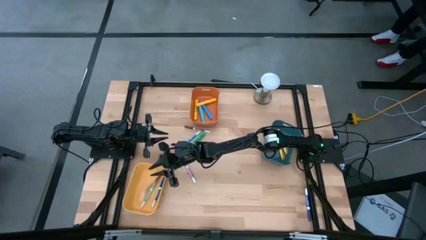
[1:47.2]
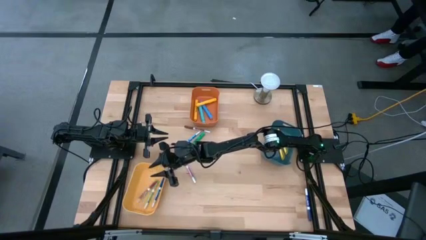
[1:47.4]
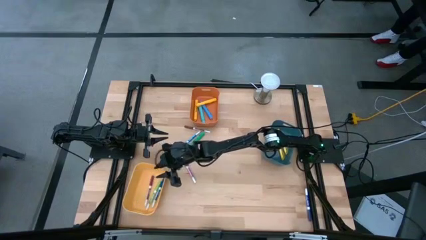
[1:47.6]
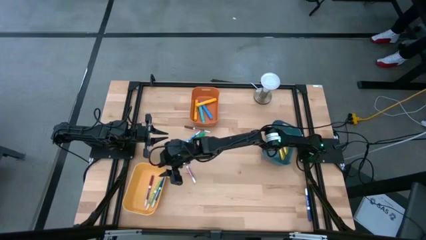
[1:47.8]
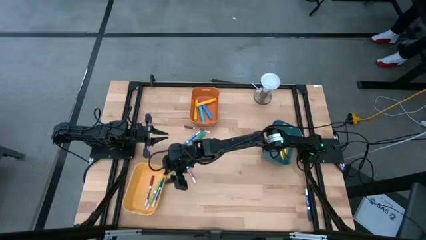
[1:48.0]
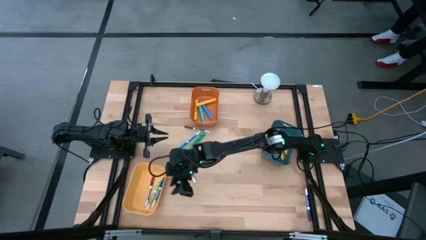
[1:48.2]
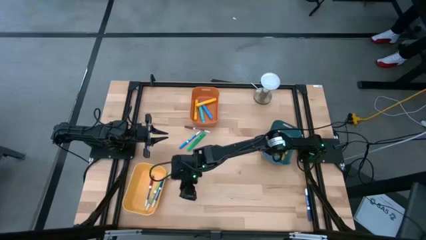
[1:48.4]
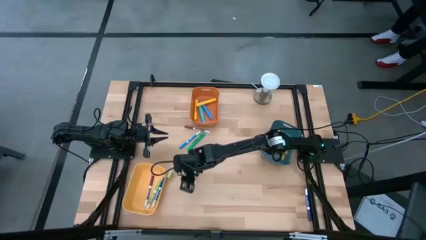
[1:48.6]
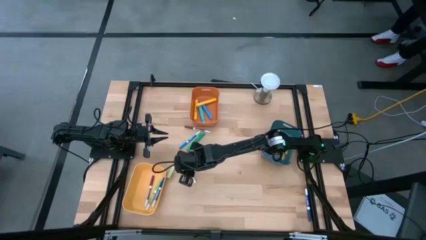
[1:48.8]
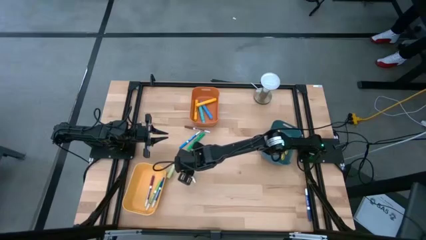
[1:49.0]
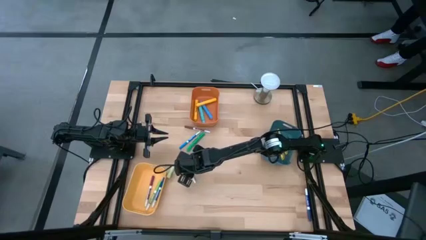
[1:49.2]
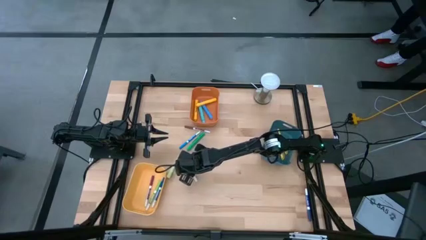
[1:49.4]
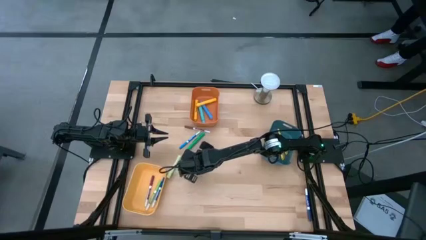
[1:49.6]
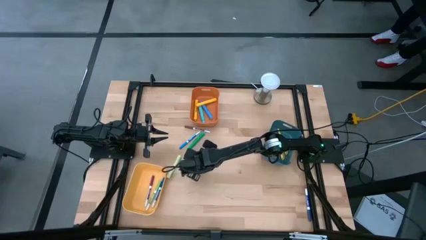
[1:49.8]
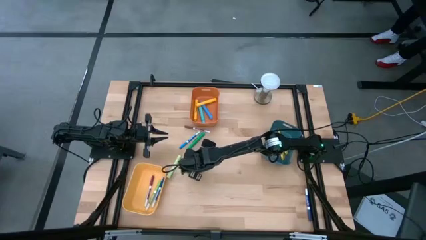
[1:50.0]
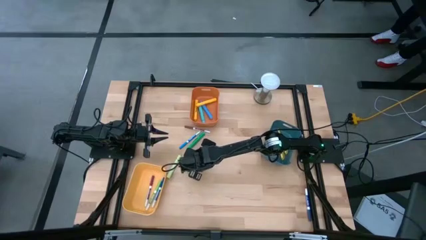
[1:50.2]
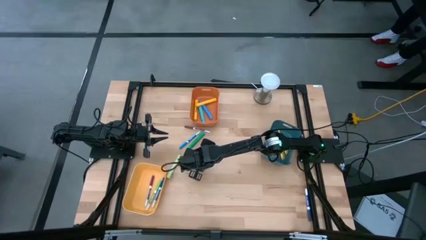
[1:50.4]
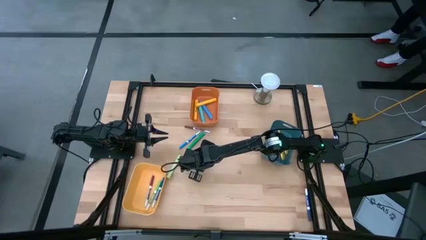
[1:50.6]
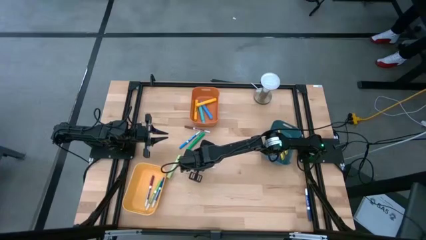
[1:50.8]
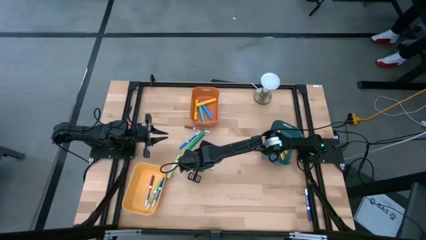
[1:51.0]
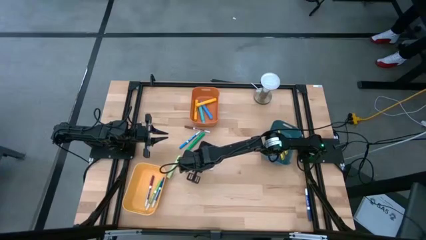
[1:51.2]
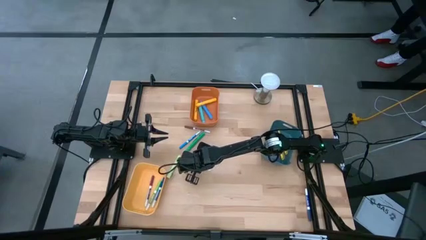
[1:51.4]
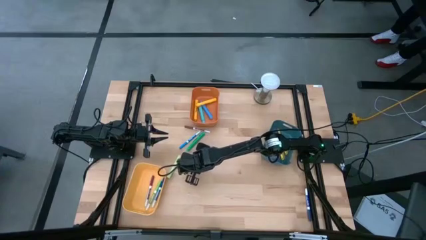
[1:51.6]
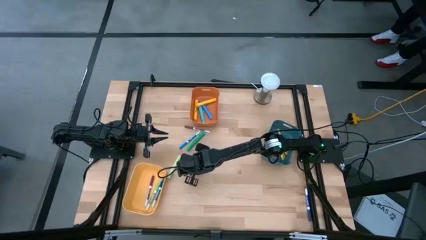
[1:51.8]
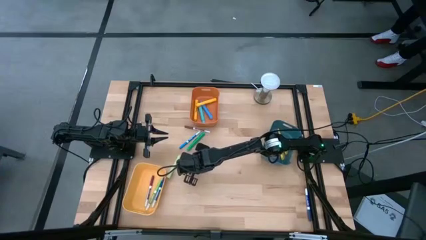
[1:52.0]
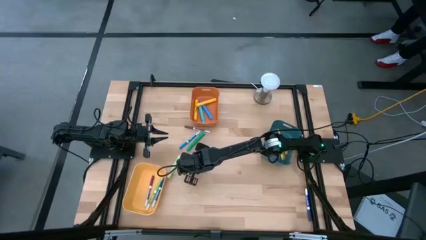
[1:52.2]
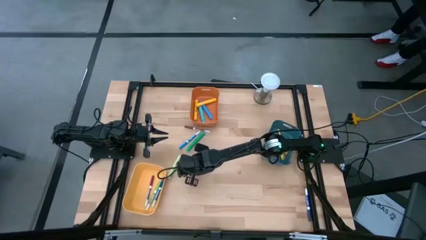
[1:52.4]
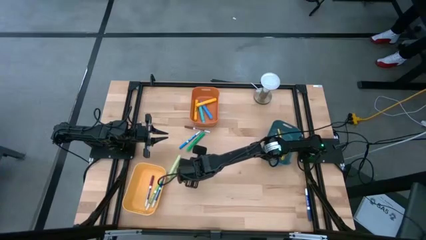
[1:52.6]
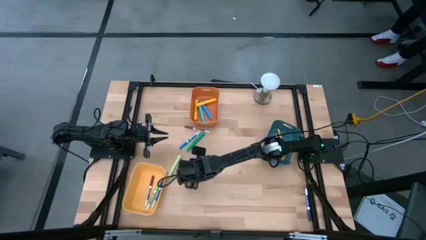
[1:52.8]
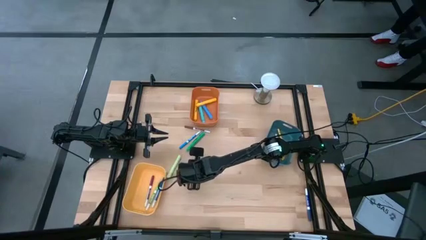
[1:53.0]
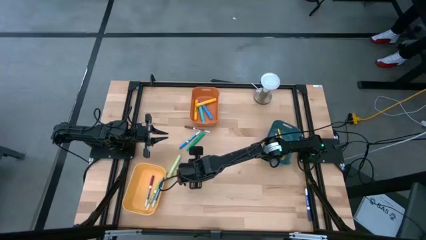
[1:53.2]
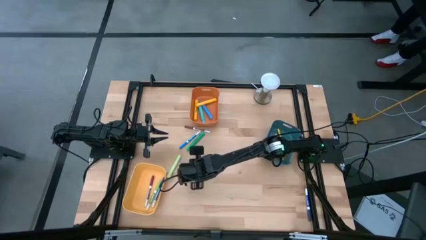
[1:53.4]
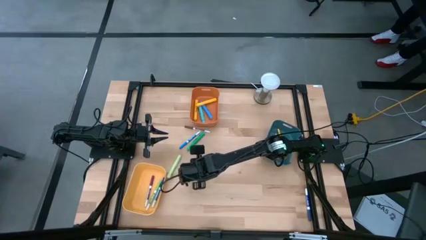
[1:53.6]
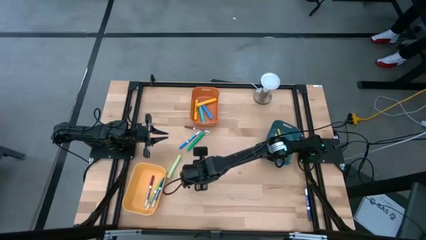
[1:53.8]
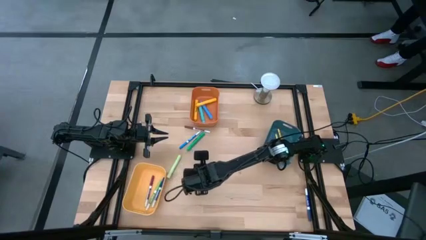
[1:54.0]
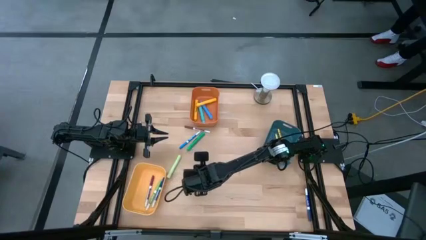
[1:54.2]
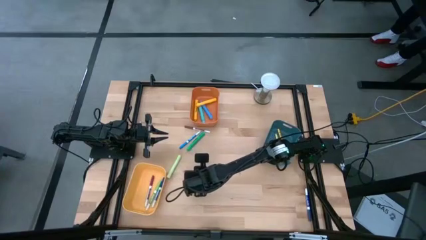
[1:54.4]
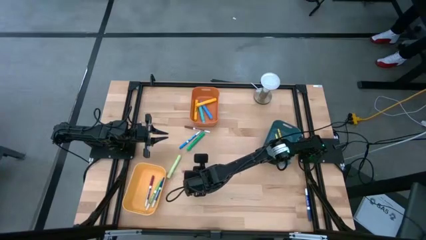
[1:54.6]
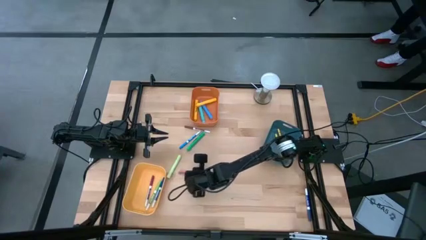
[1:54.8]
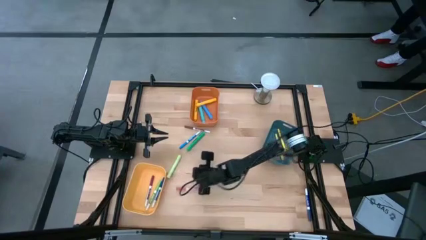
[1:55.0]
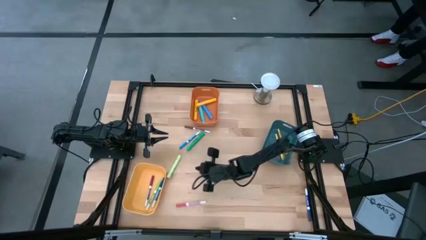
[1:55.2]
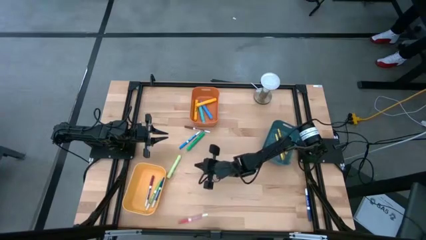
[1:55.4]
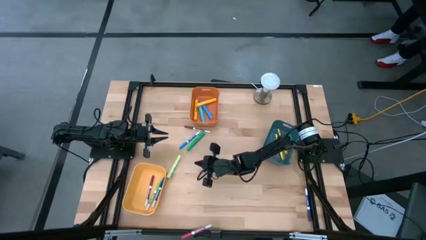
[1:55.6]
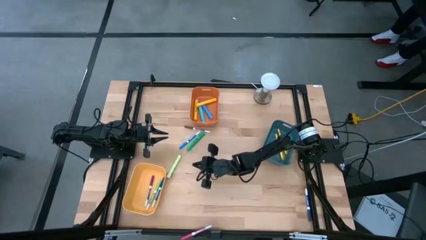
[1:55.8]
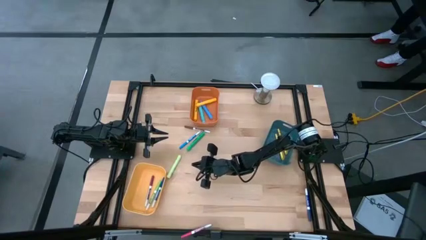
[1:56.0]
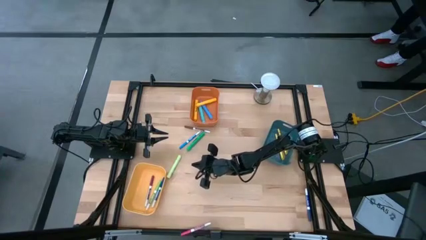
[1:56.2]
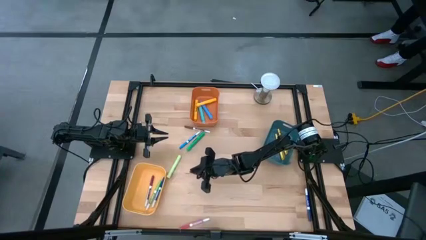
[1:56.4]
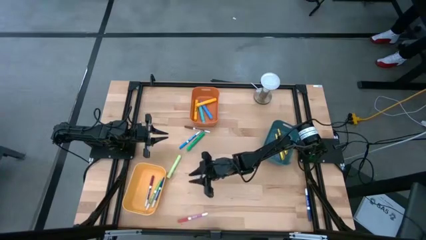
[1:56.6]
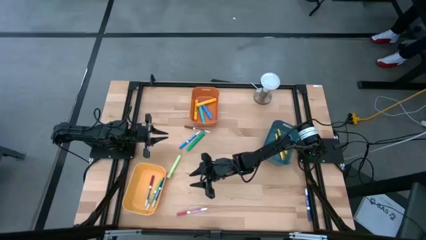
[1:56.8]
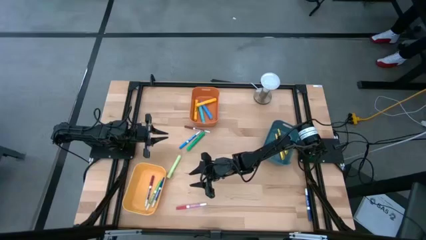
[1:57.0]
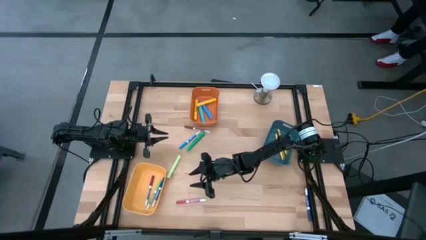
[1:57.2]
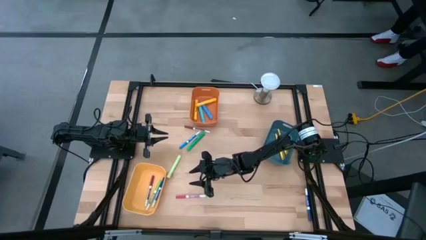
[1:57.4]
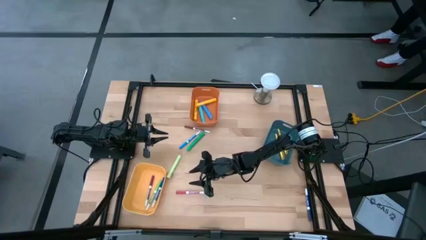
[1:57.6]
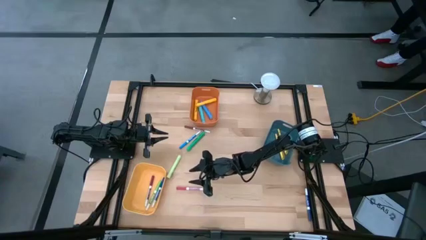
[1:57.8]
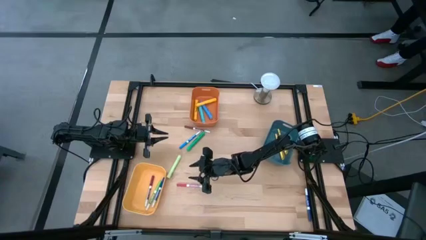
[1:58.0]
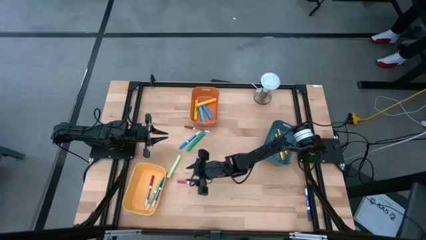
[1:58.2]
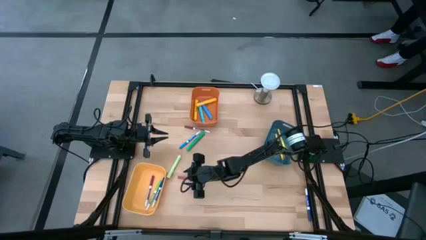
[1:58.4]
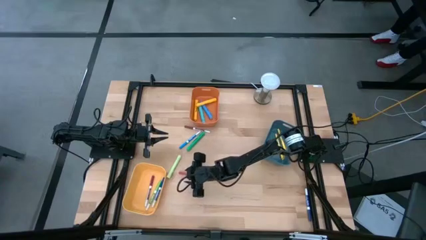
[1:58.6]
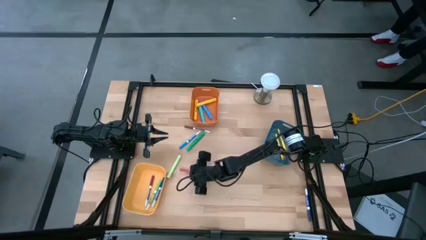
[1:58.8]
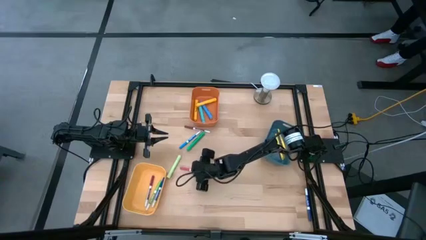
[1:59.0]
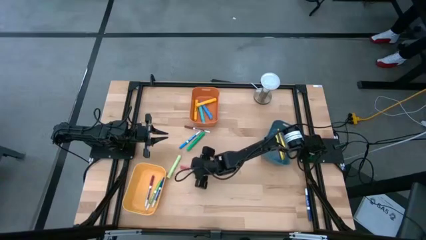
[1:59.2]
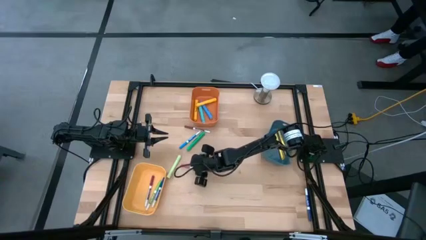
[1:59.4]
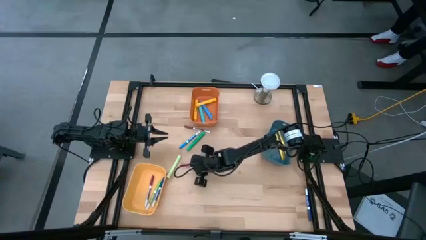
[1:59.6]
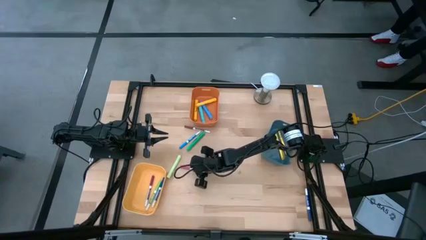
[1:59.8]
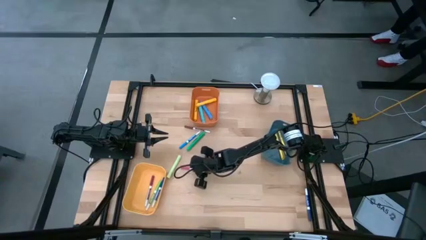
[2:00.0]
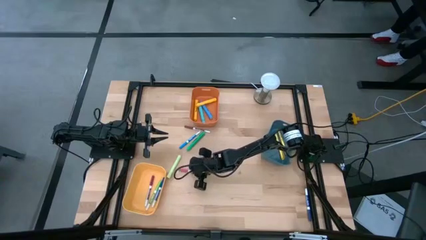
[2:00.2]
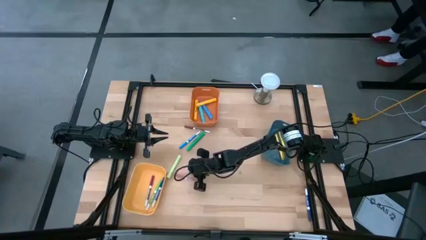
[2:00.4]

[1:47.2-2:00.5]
Task: Pick & Place Markers
Put the pink marker pen into the yellow bin
